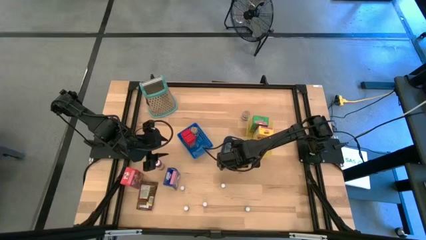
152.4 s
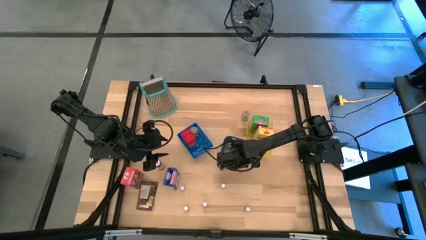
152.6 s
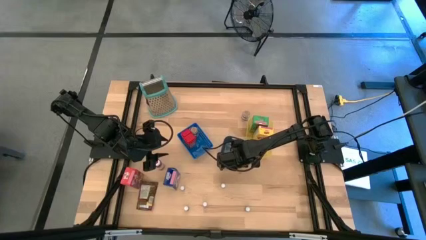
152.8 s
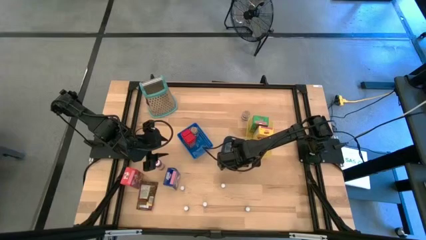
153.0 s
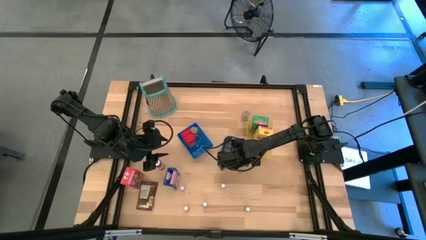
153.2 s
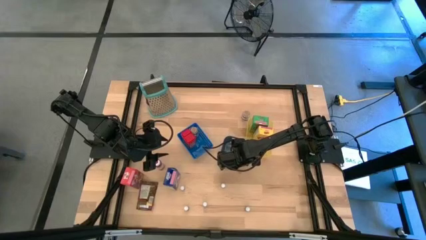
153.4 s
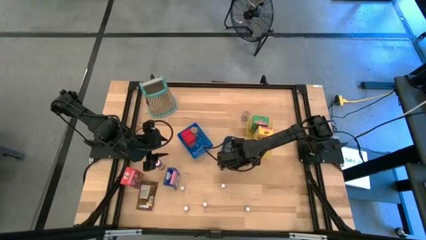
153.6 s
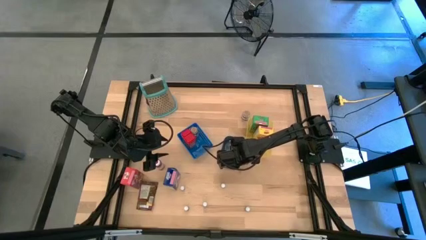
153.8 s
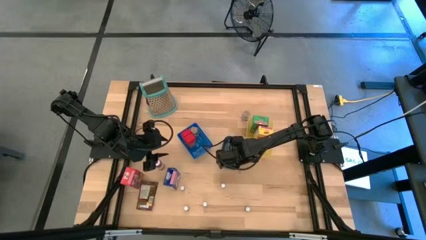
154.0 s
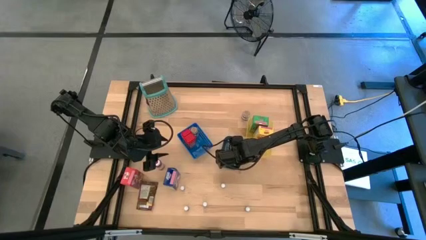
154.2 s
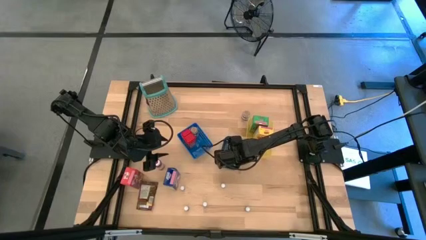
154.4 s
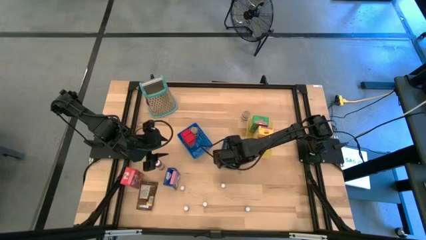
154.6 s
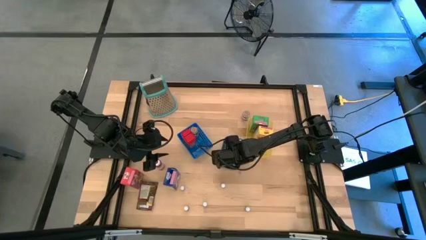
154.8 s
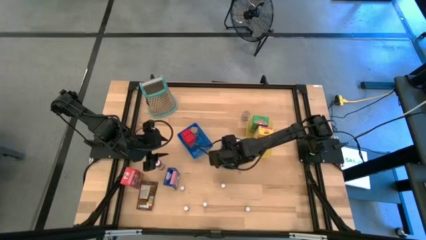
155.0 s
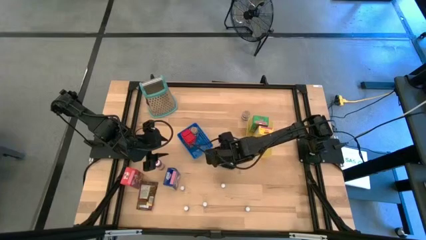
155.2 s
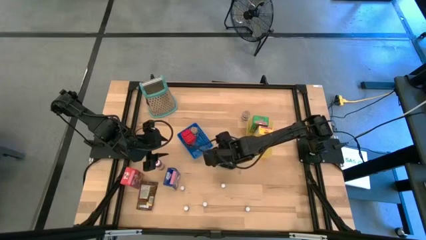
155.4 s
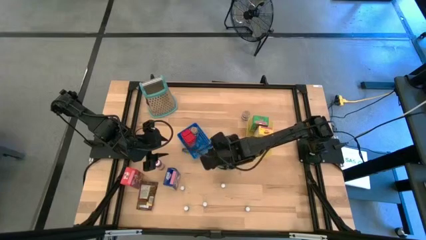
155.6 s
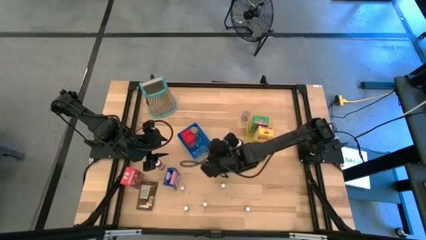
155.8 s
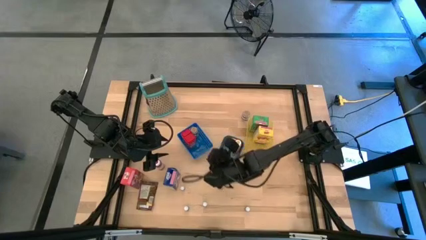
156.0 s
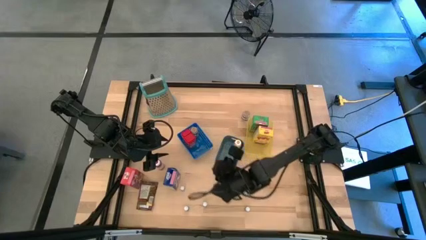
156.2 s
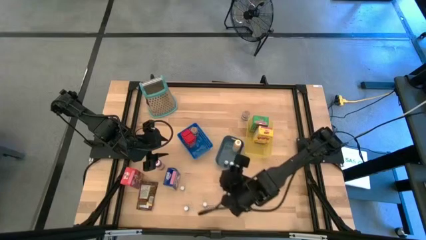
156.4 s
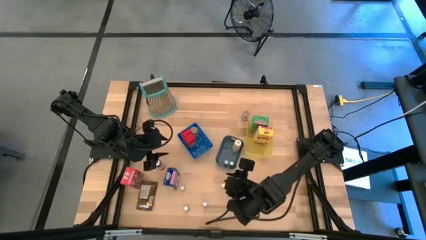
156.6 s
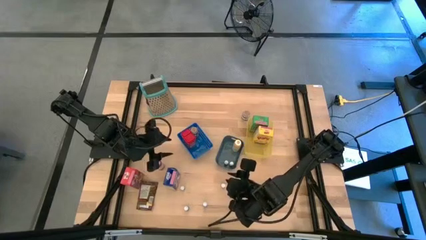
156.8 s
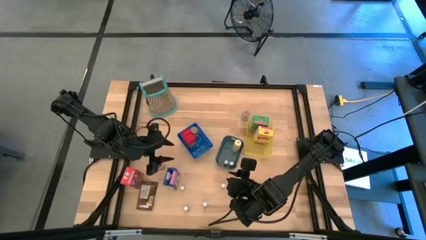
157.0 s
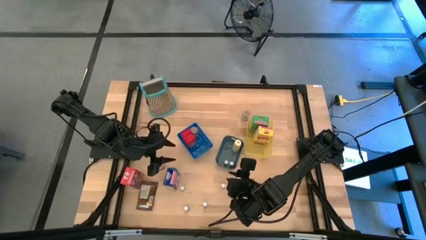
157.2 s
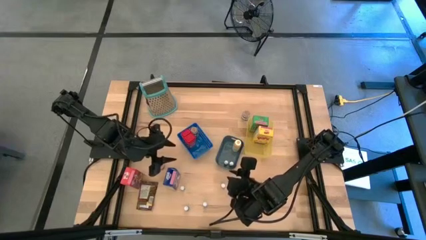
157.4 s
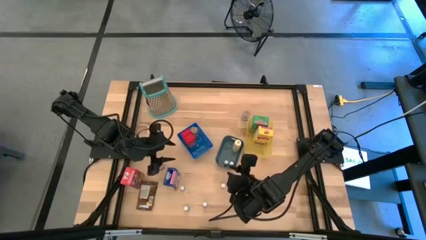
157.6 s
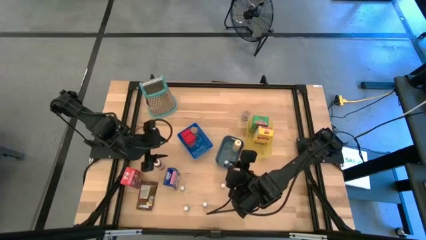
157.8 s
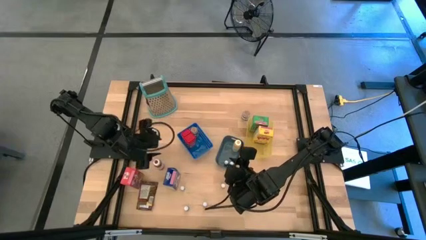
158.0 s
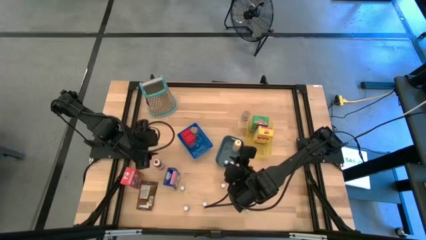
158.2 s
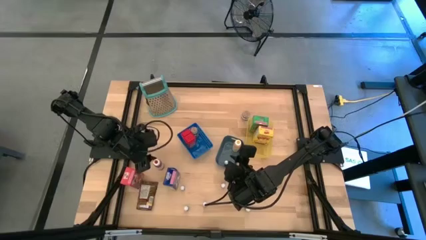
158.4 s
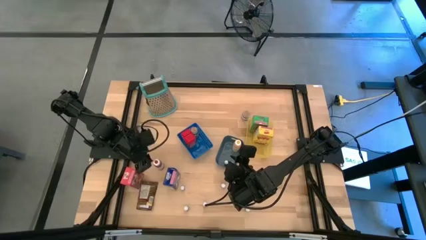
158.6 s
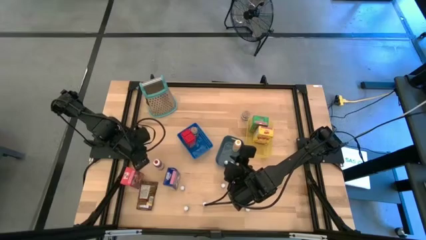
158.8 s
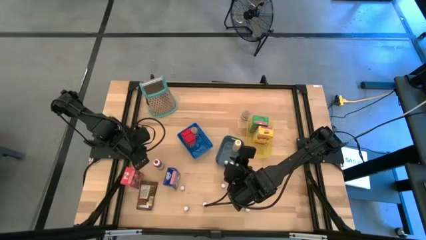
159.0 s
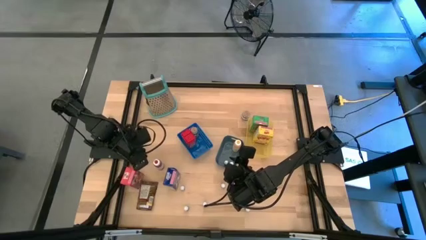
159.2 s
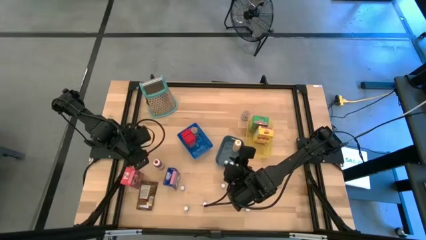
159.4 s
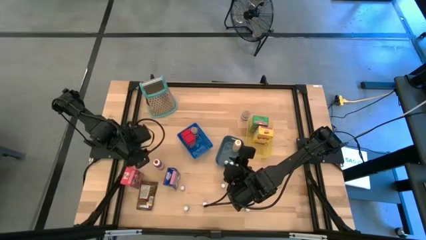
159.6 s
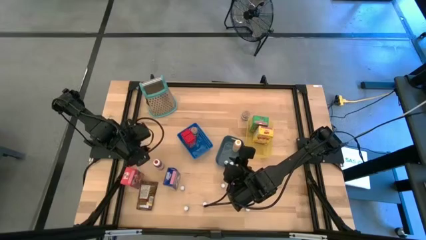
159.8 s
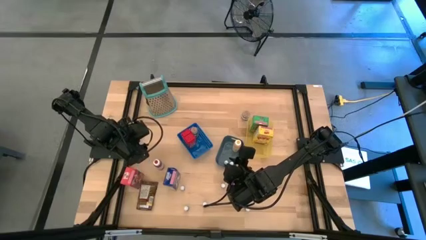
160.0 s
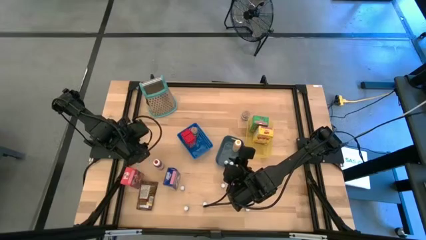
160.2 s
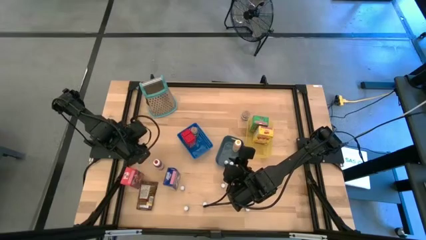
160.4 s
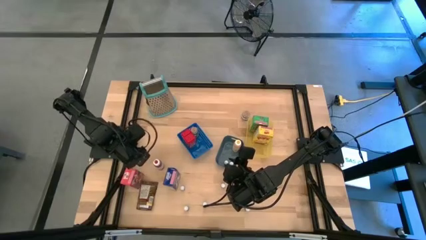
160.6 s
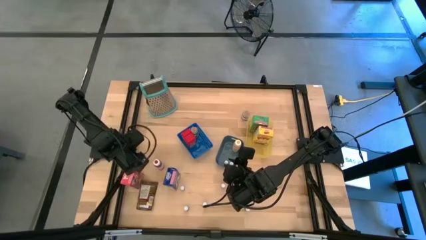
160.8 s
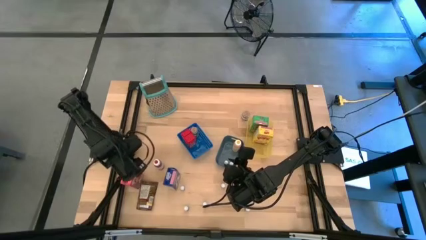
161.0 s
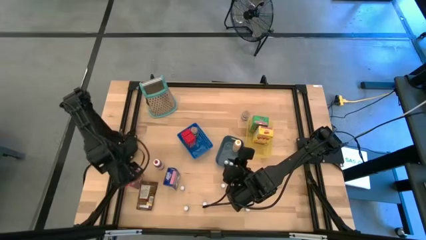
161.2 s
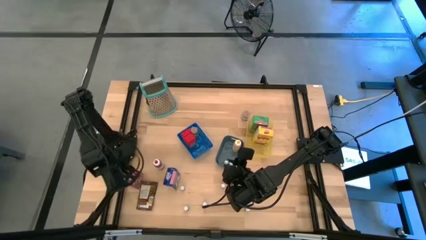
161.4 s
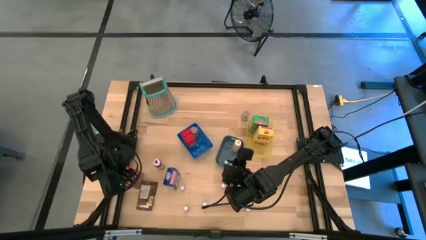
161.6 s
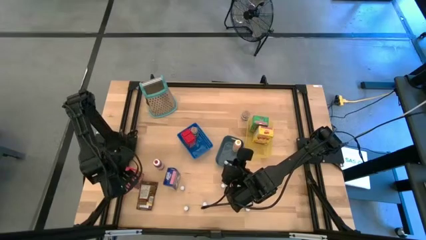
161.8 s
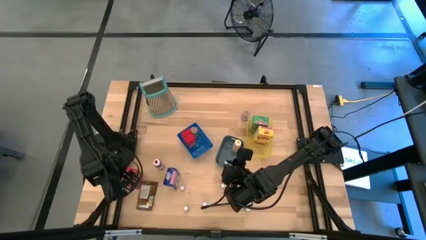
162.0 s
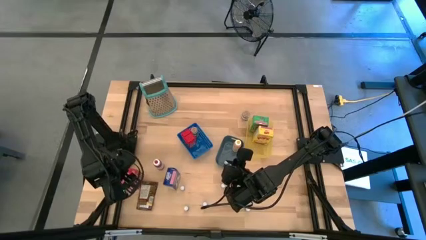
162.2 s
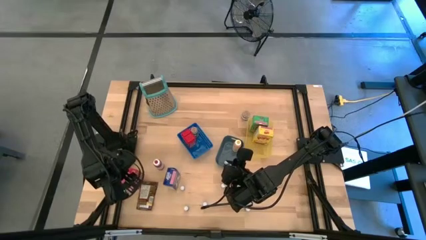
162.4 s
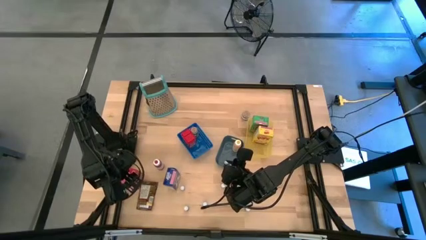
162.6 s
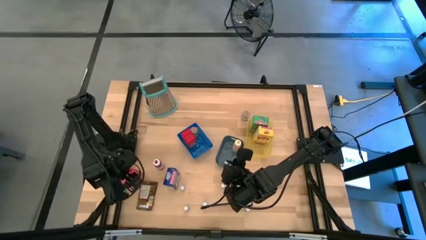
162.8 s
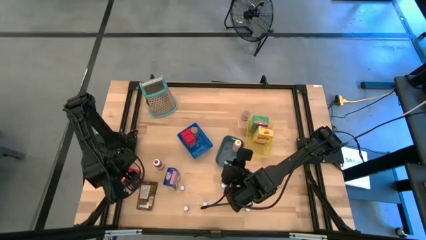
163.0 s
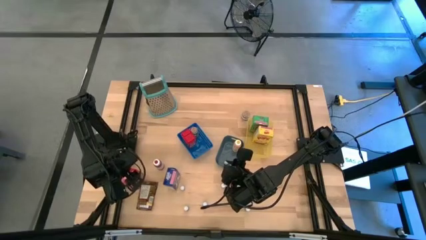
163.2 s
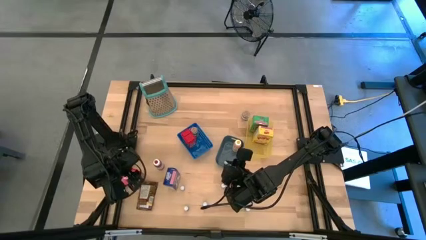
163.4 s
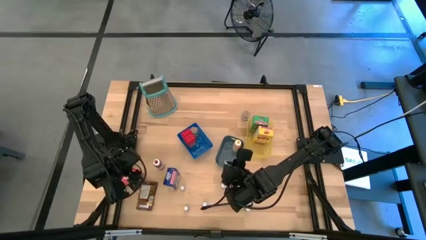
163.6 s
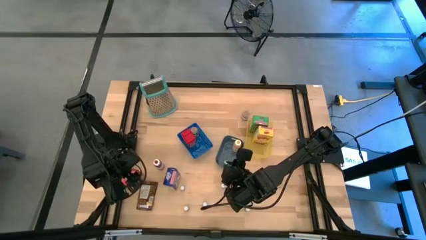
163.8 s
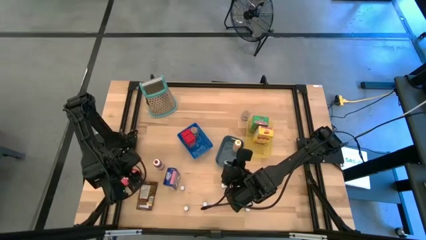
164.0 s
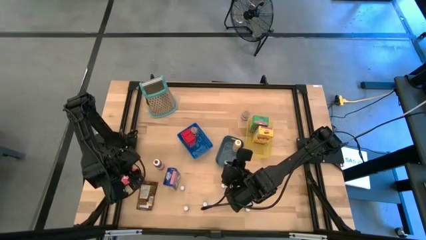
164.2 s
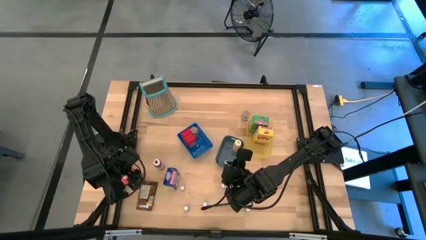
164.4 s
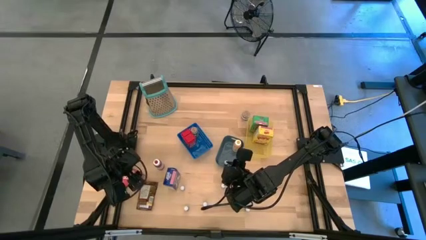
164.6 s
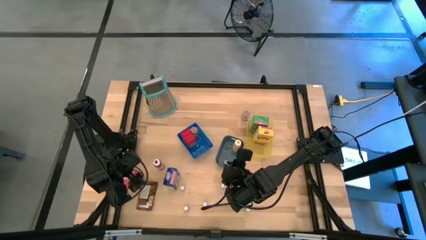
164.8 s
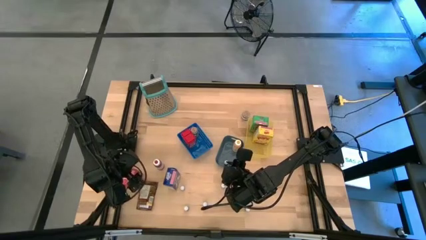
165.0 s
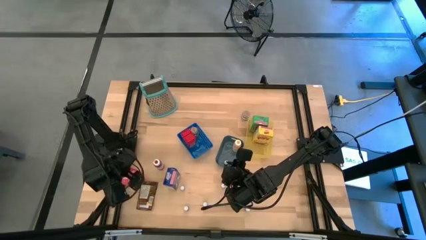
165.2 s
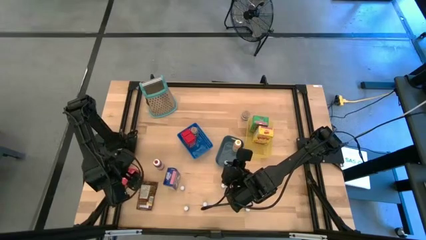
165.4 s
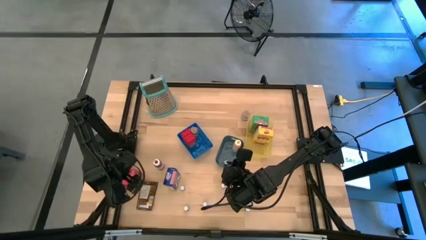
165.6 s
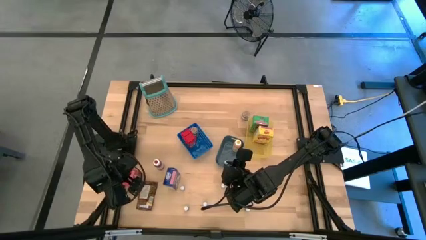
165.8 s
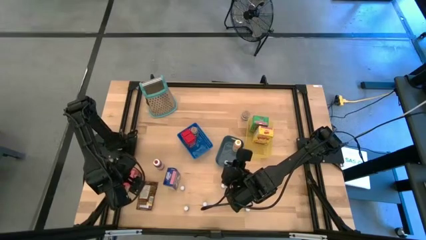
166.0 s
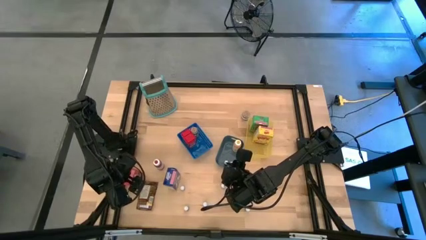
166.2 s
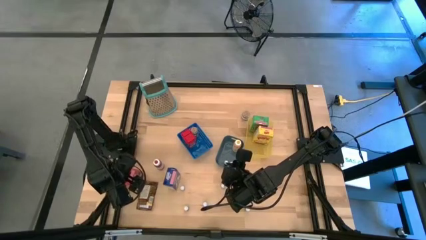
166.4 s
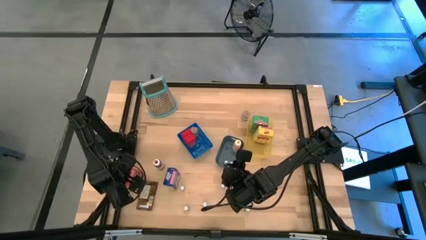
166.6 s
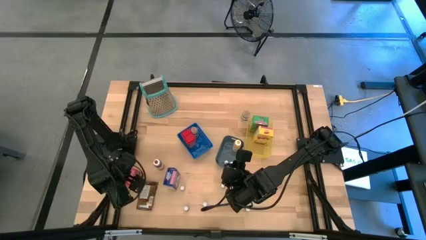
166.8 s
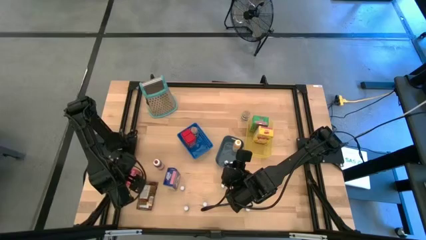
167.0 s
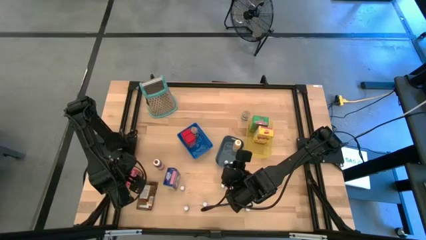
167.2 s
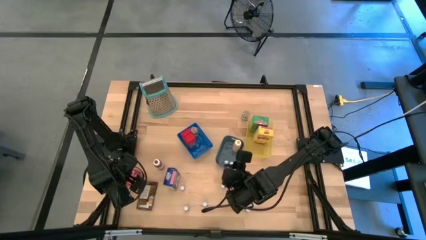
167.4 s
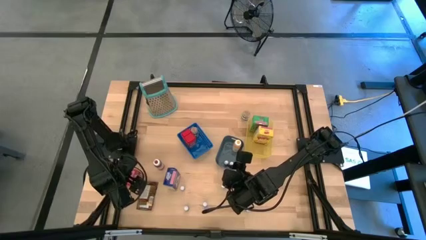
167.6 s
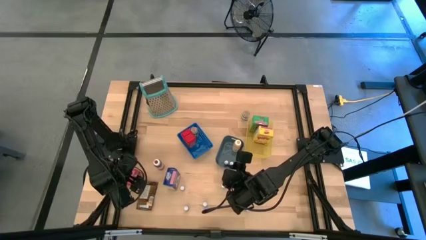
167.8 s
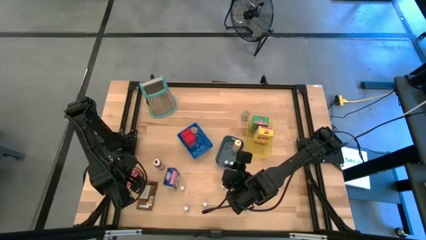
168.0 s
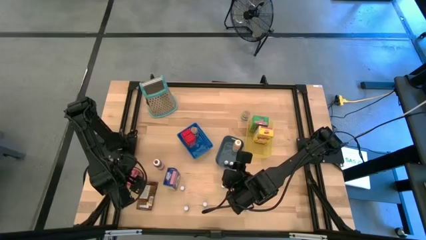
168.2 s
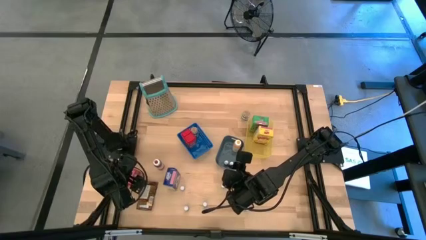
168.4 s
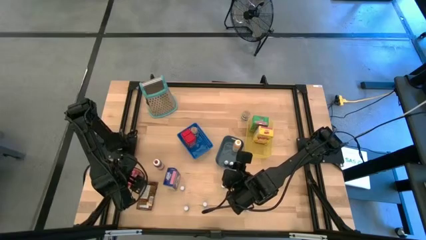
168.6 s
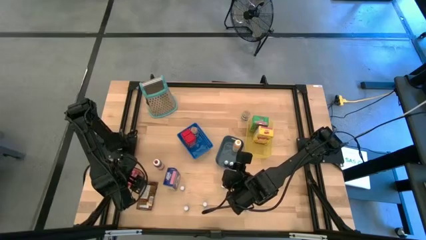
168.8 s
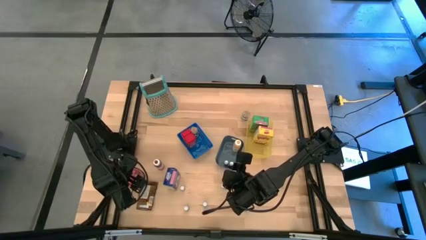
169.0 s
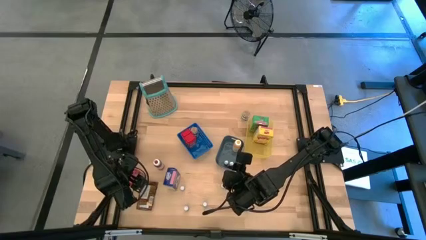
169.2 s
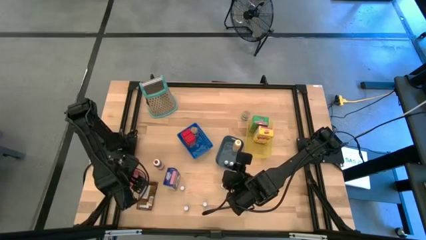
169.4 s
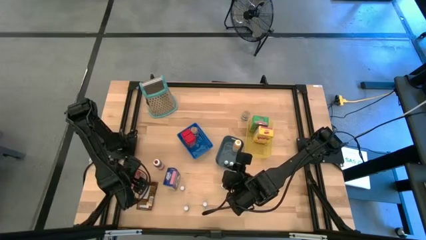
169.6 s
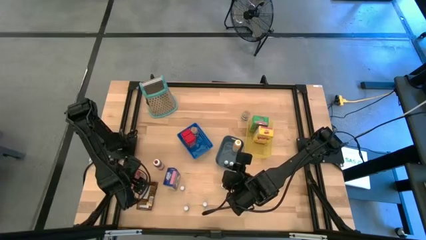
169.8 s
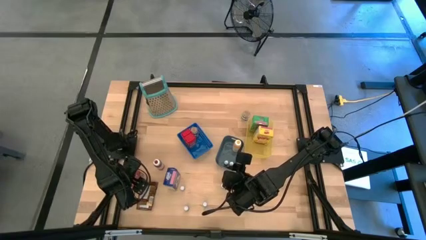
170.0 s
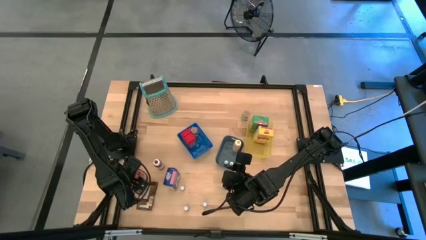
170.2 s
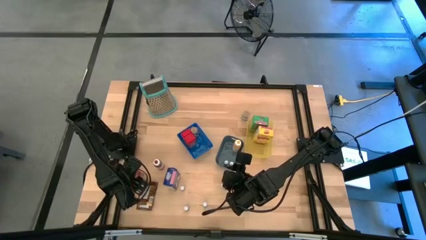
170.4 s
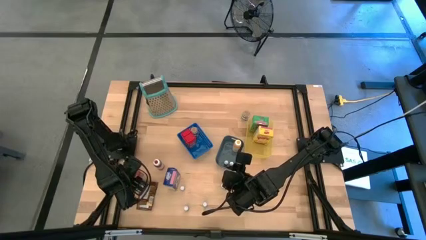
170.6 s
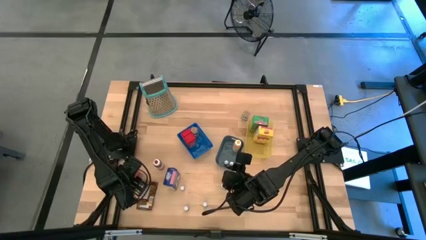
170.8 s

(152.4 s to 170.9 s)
Task: Pick & Place Kitchen Items
Put the red cereal box into the yellow bin
